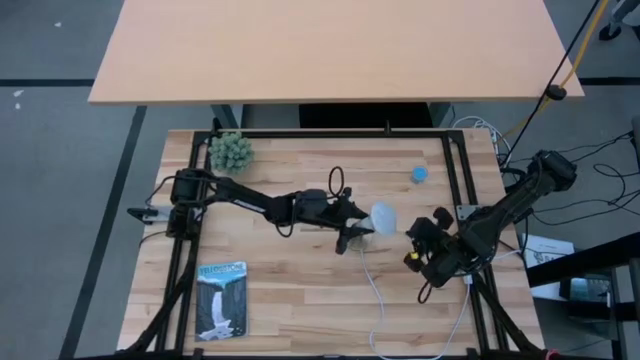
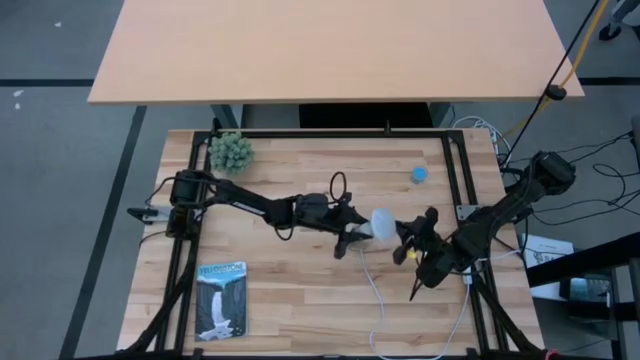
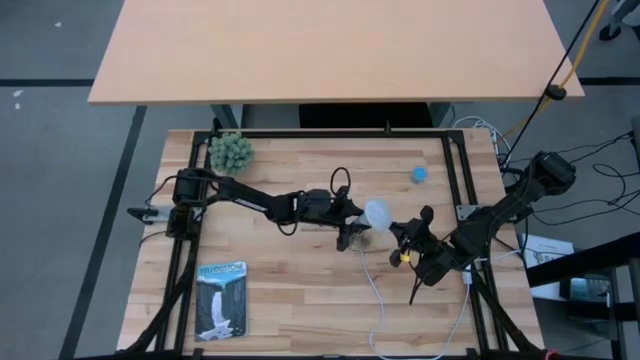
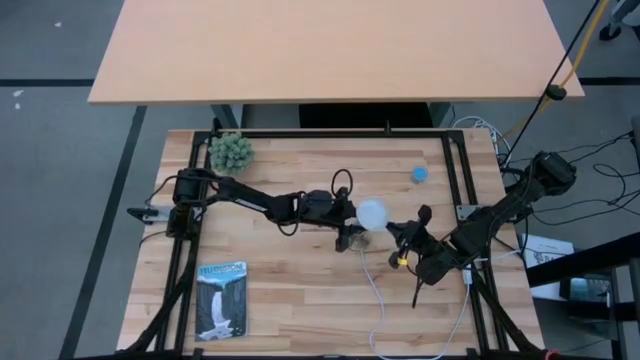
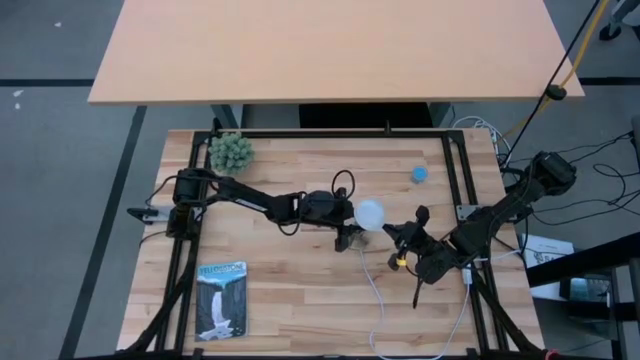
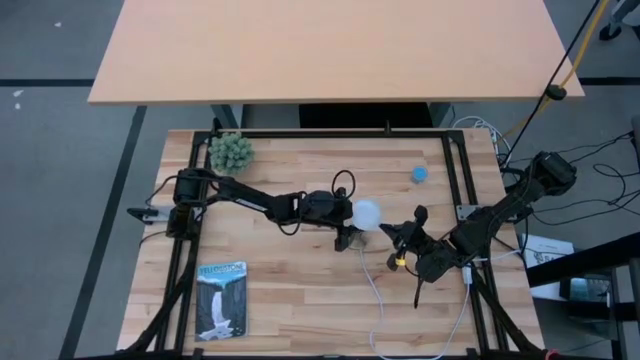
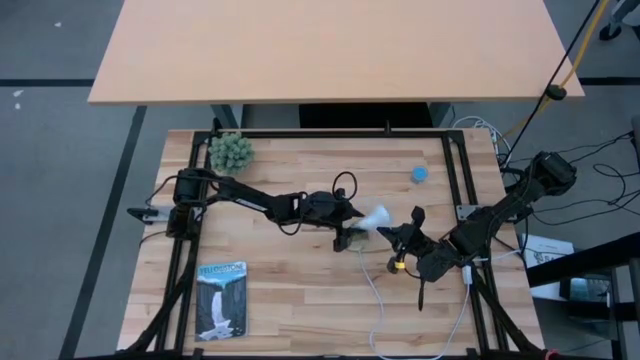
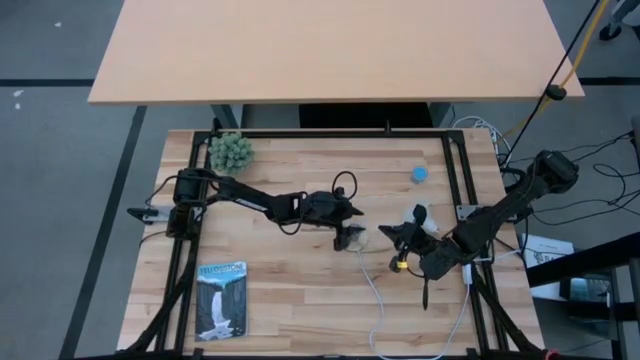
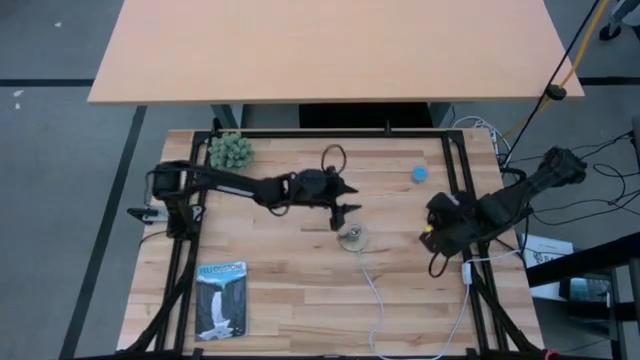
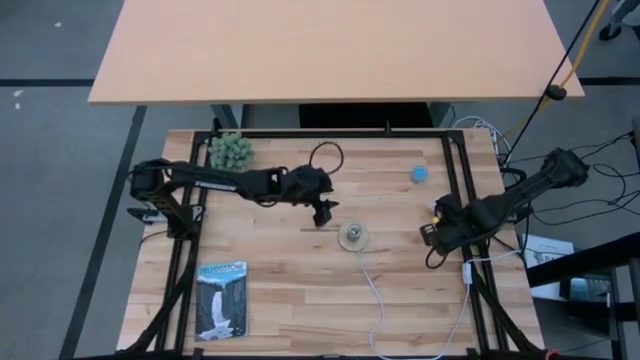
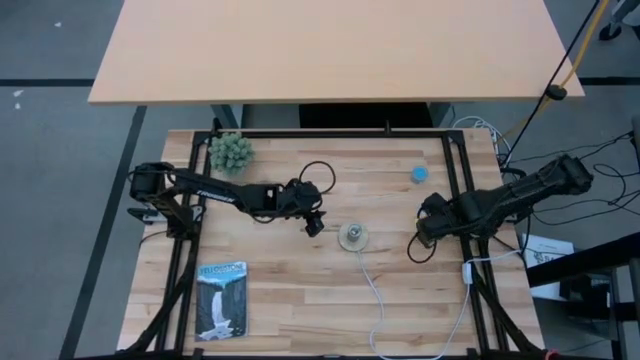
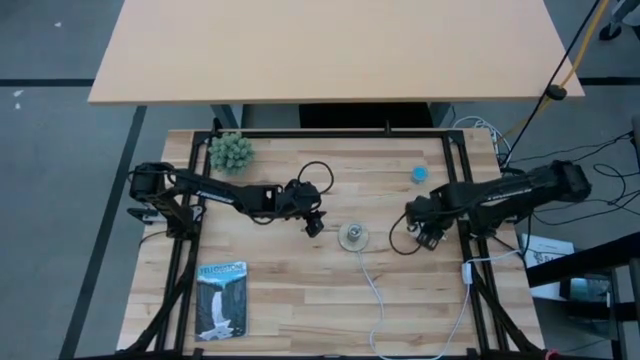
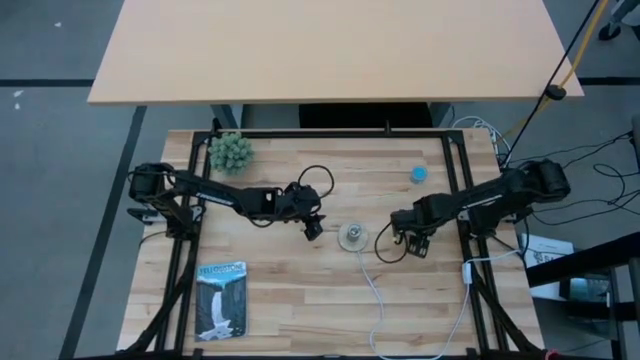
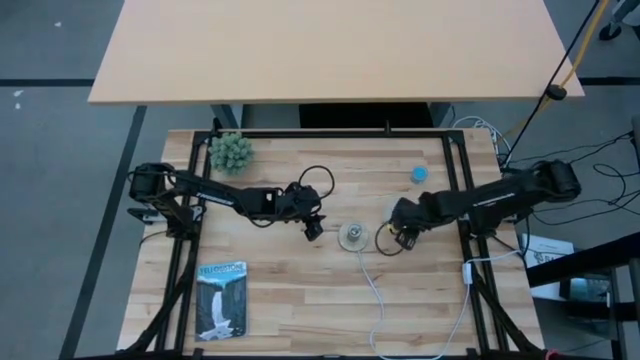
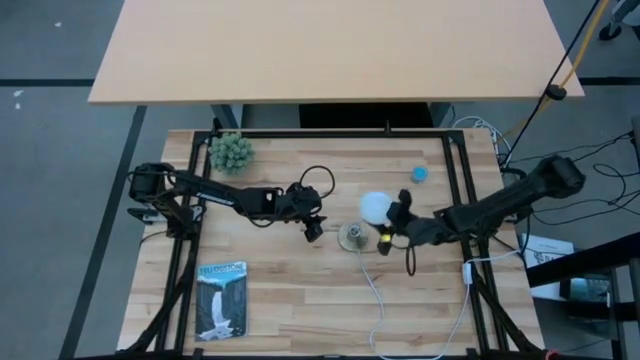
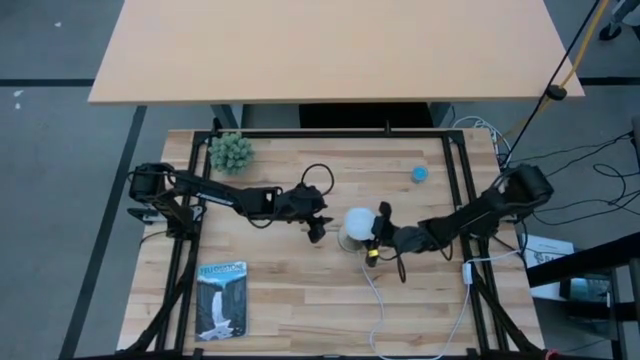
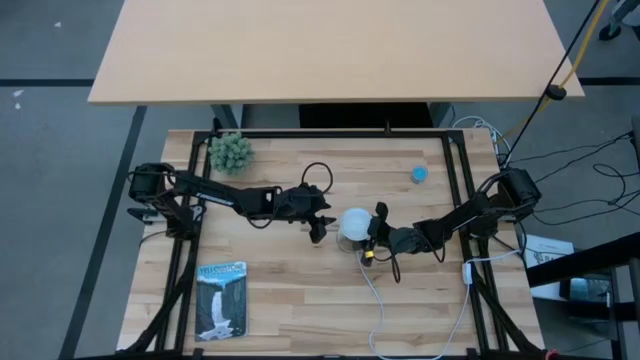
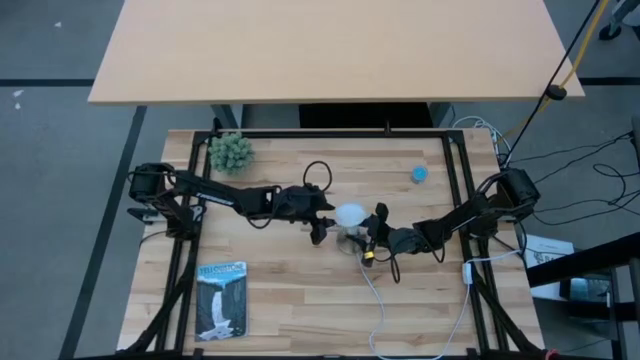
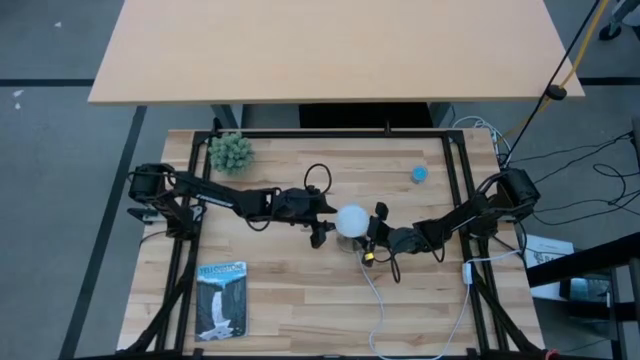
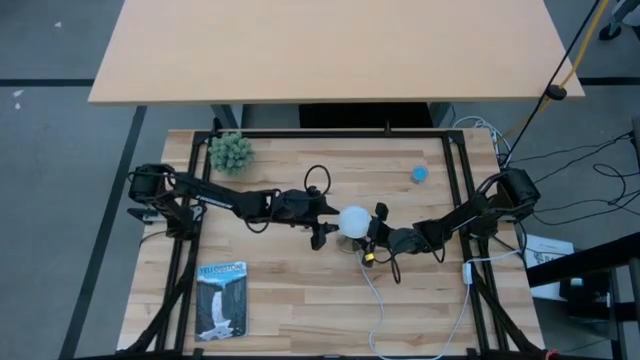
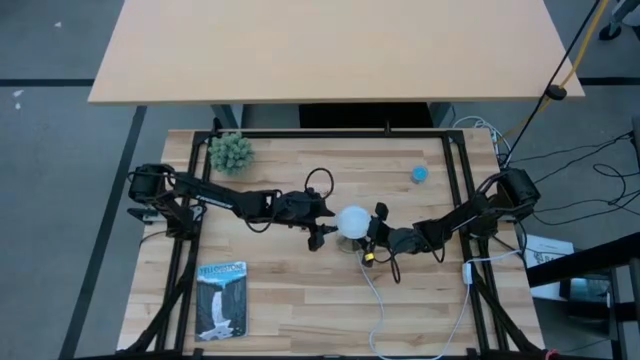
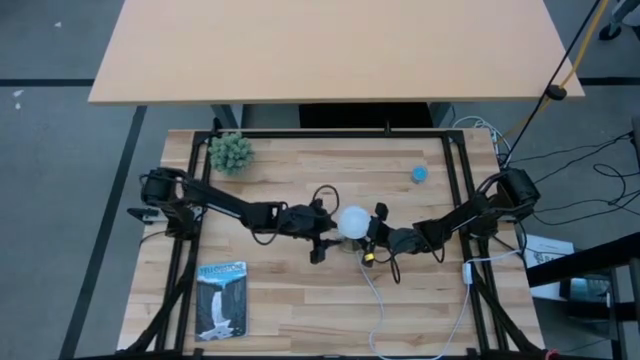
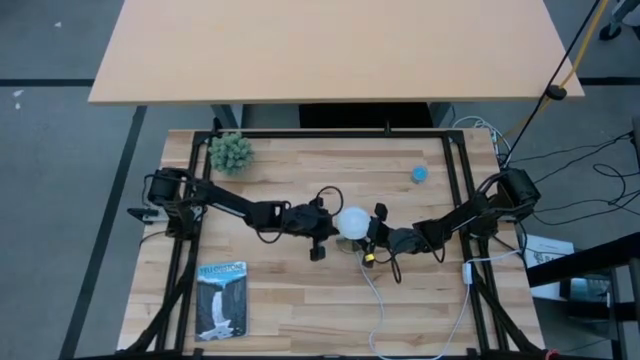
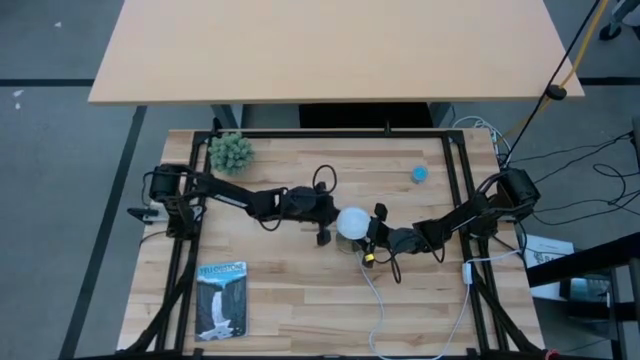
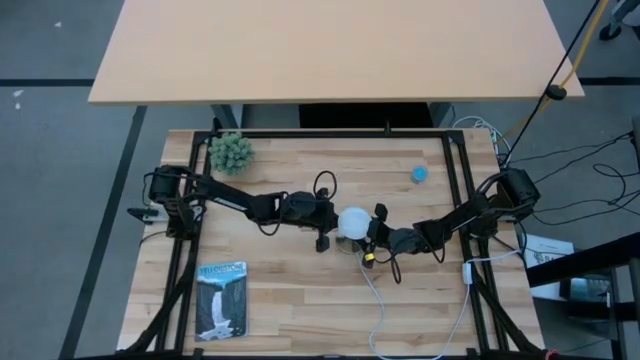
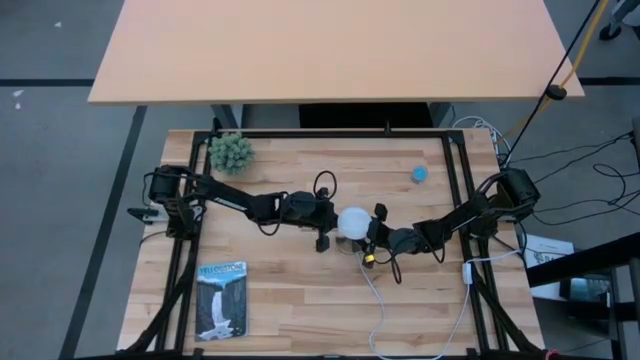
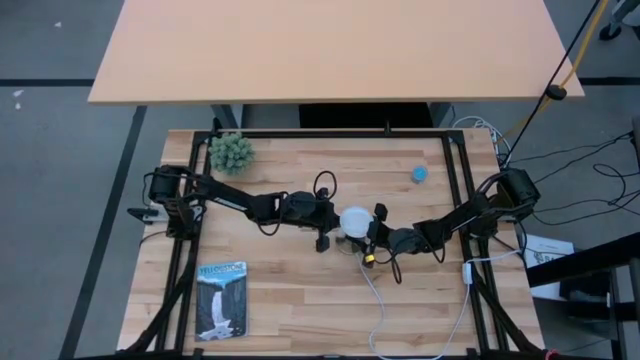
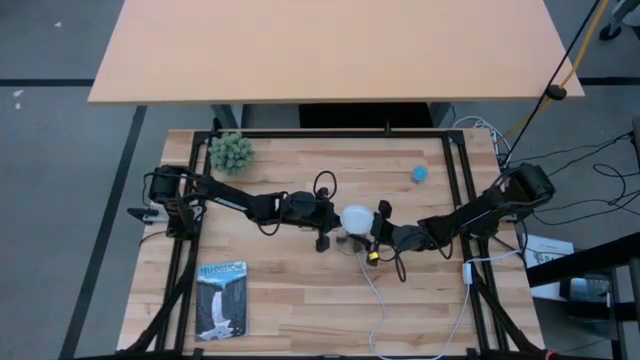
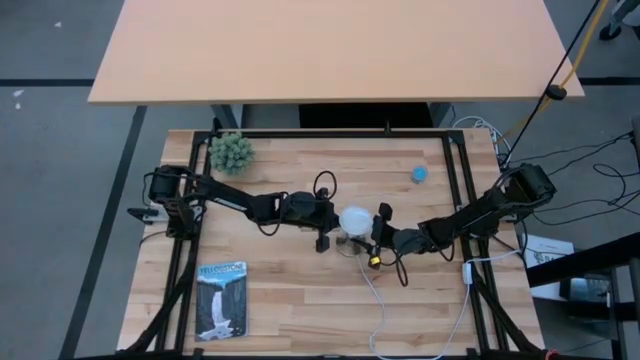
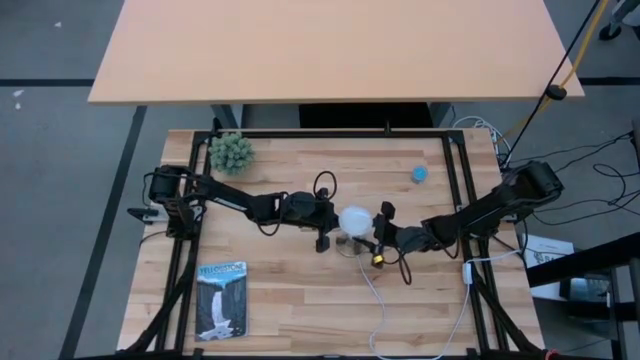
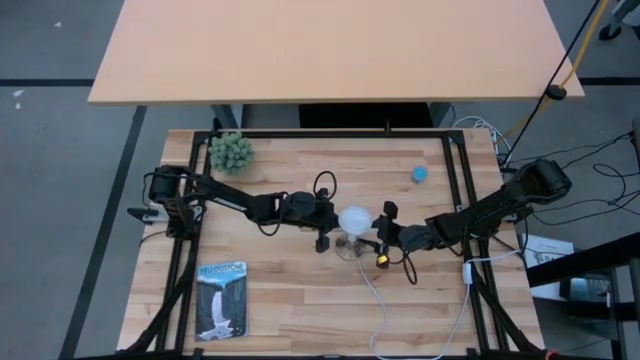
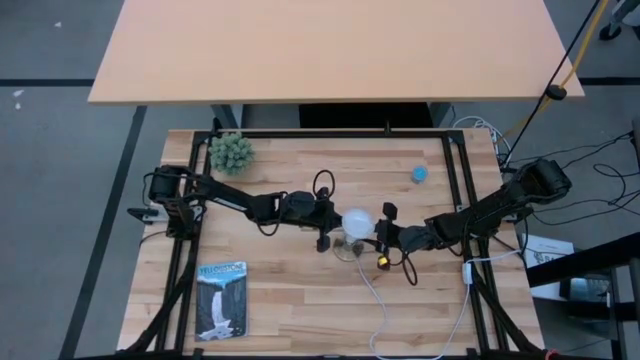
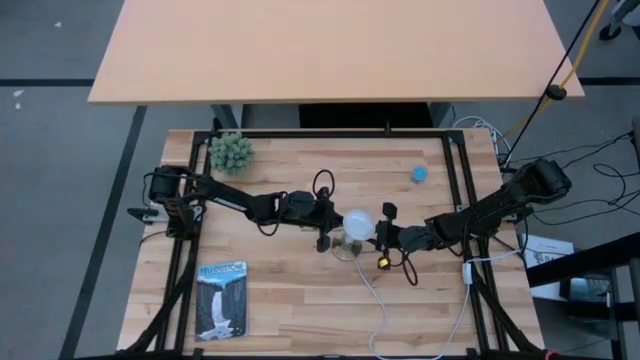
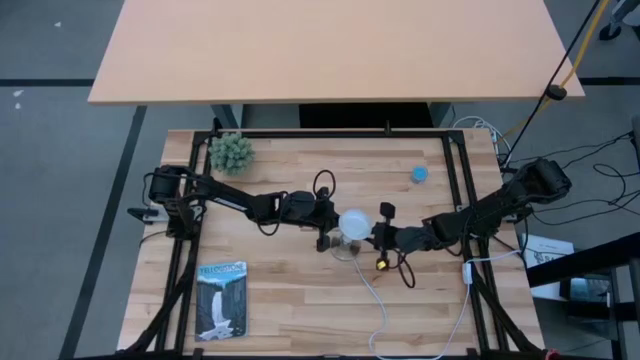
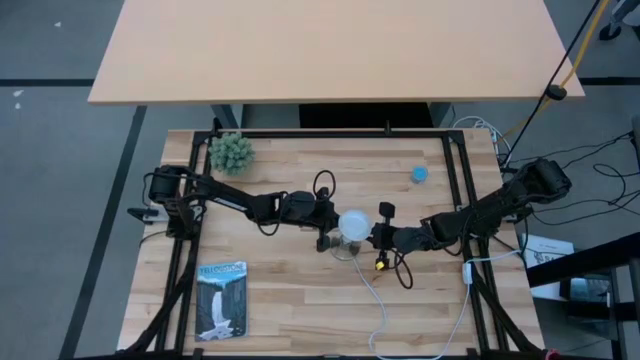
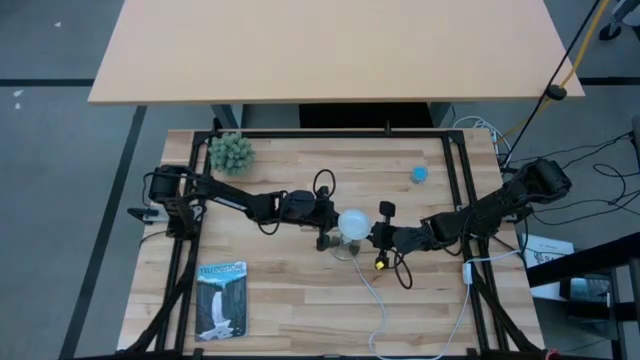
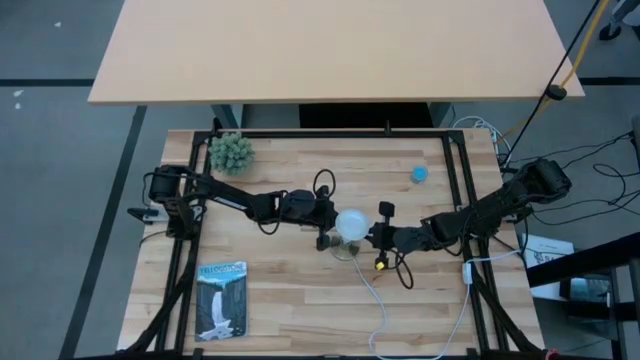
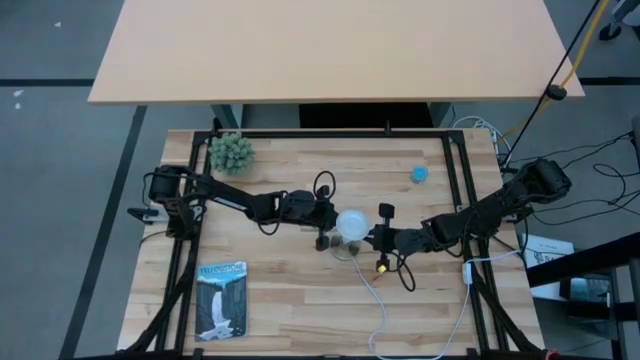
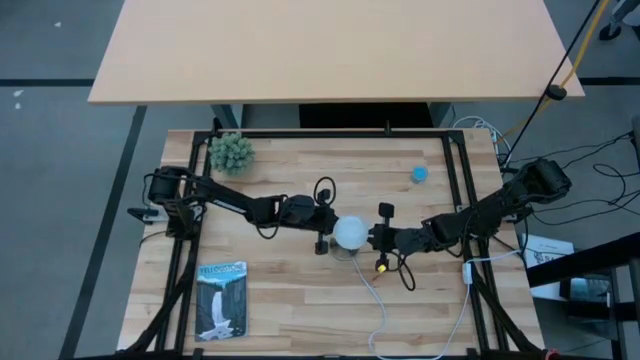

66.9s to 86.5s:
Task: Screw lightbulb
Insert the lightbulb into the lamp

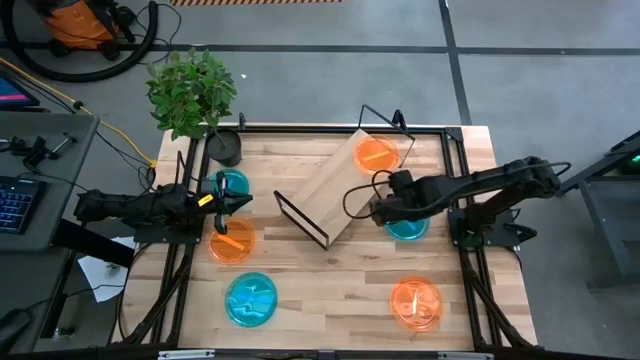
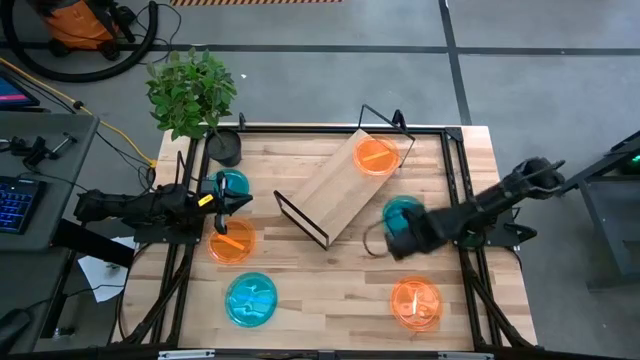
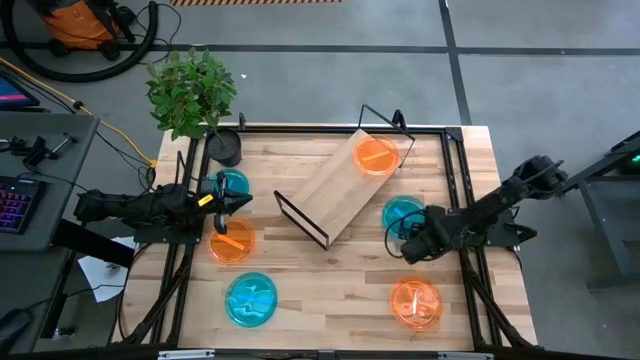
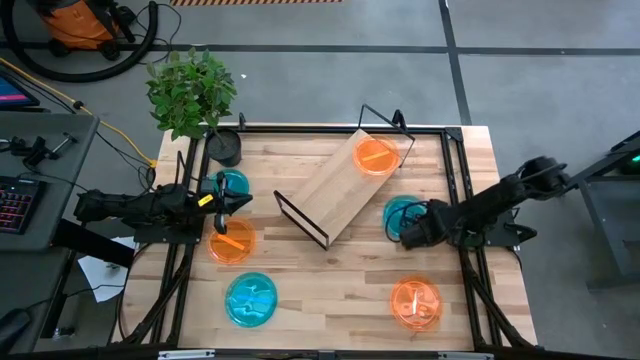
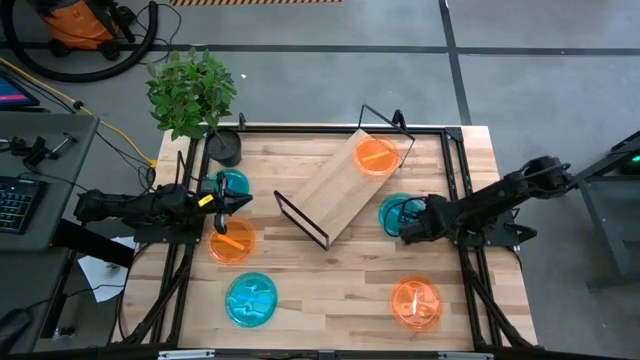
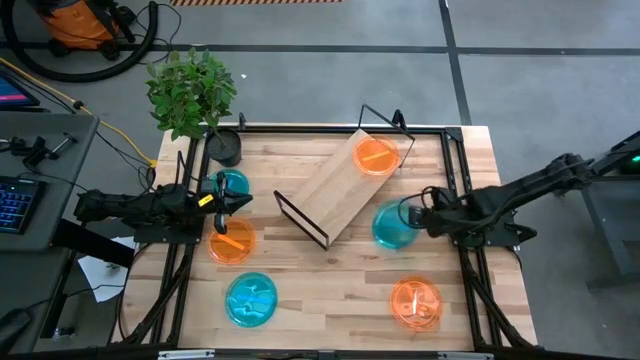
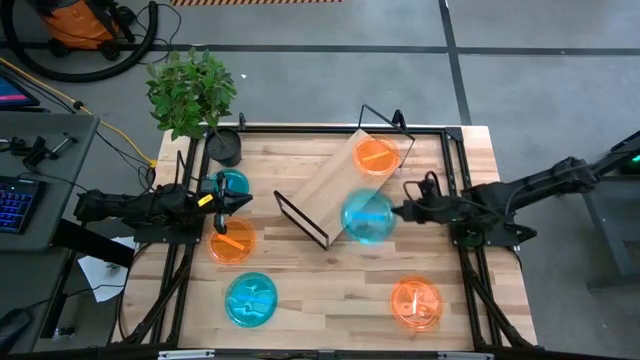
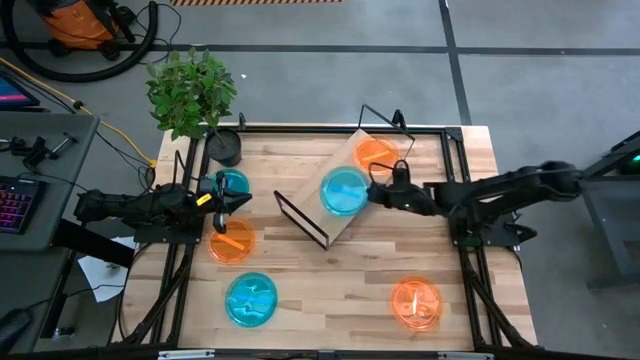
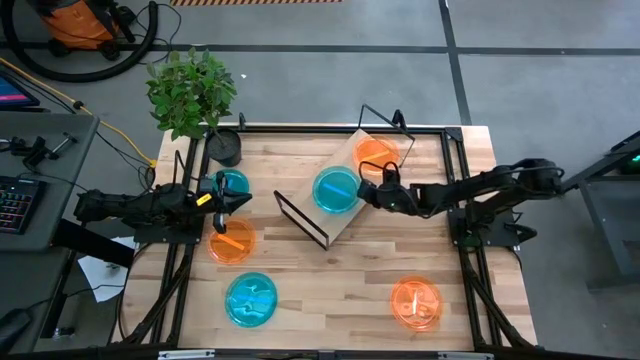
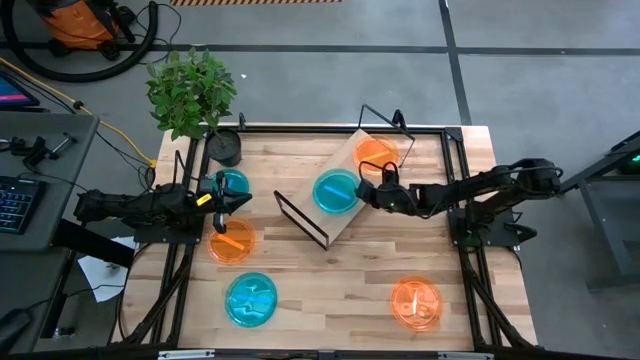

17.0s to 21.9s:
Task: Place and stack plates onto a shelf
Put the top right blue plate on the shelf
